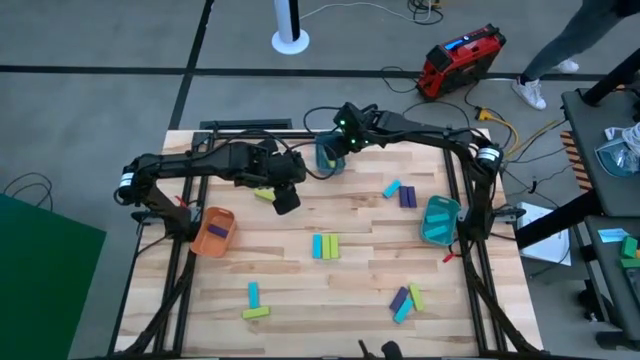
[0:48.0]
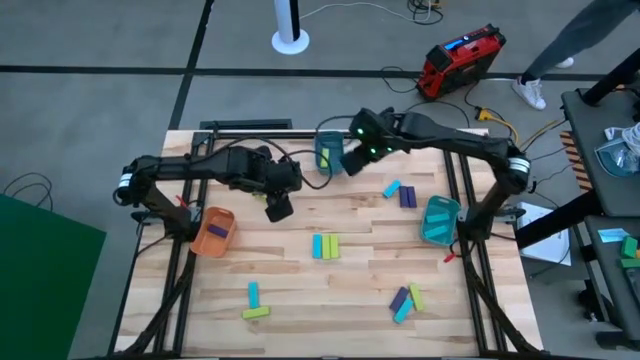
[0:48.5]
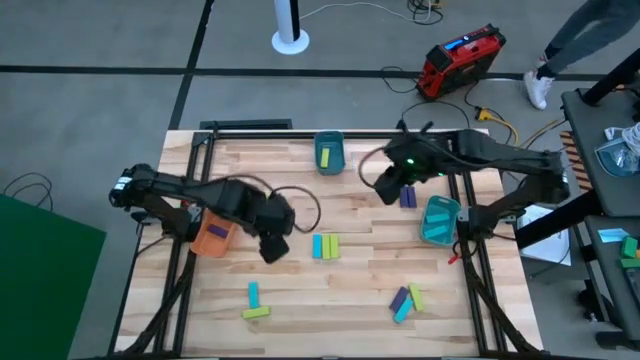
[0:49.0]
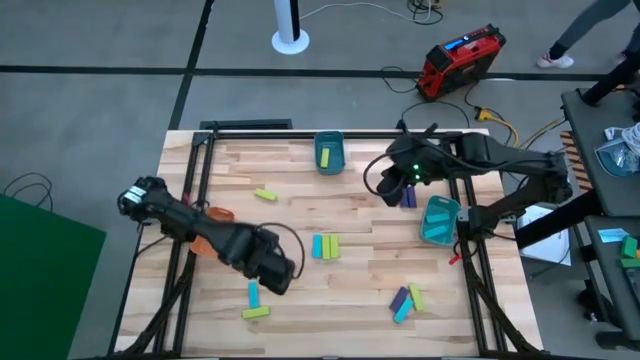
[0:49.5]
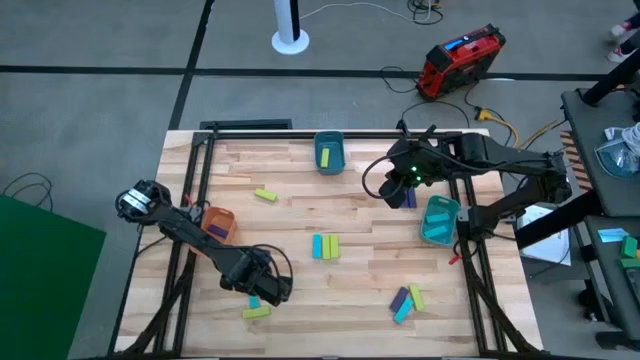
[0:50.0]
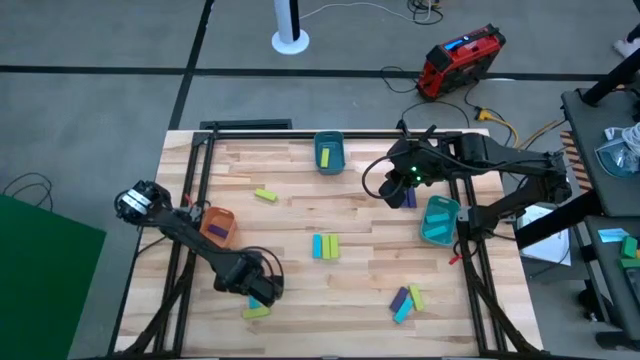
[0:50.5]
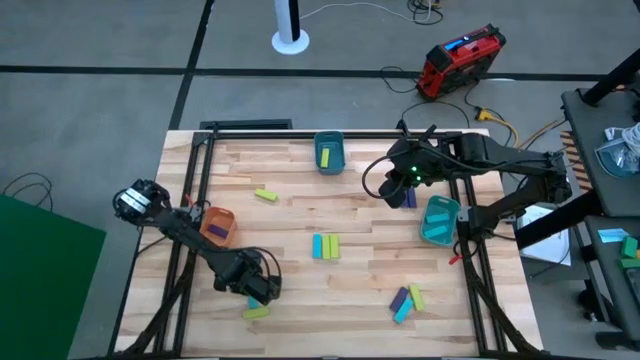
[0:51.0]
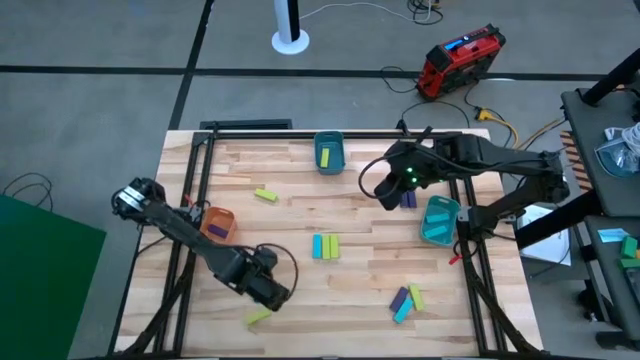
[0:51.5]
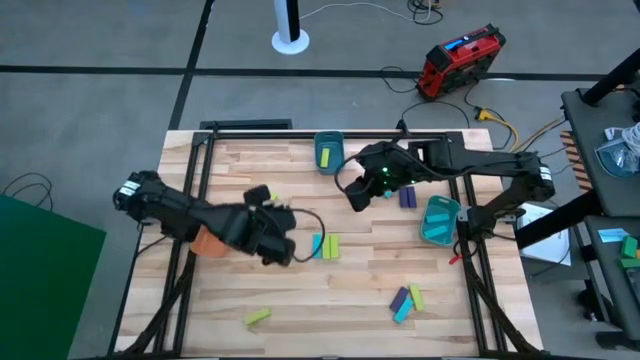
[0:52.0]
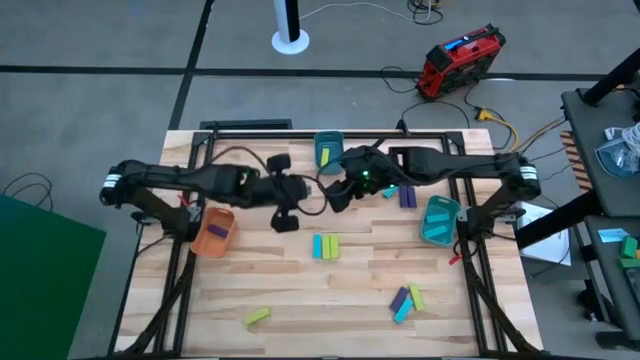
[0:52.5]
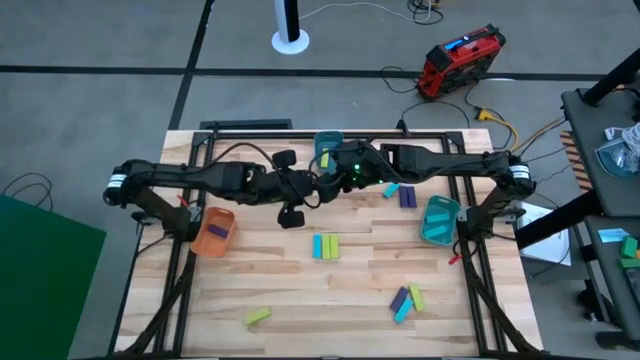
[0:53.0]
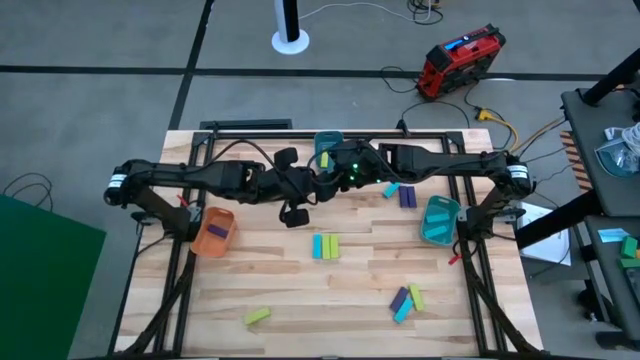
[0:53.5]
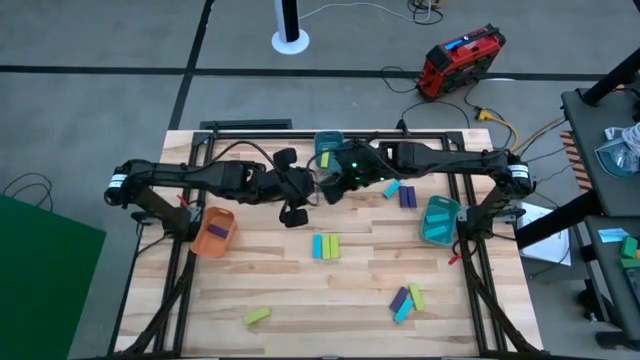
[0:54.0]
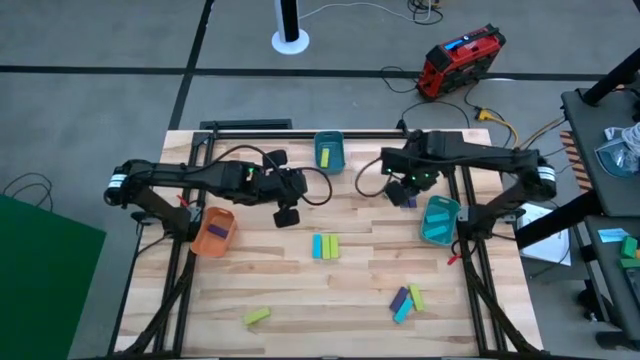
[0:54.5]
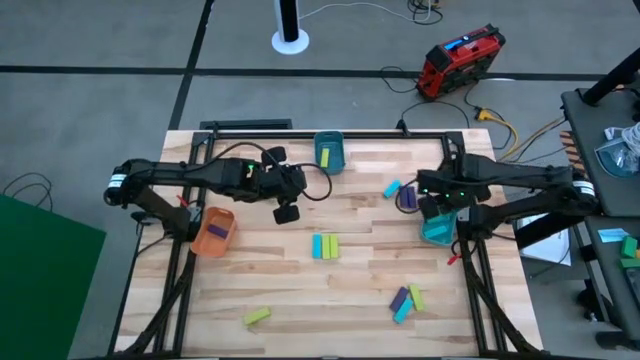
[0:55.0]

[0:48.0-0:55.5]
Task: Sort blocks
Put the blue block into the light blue bin

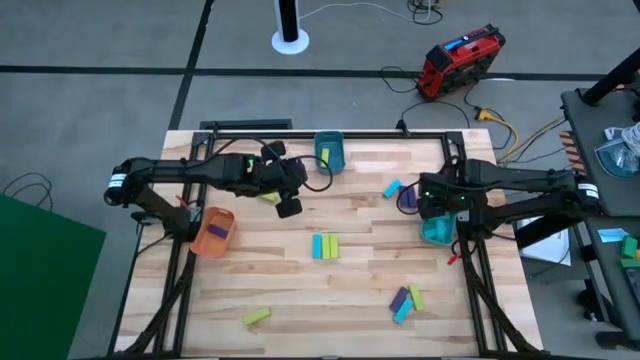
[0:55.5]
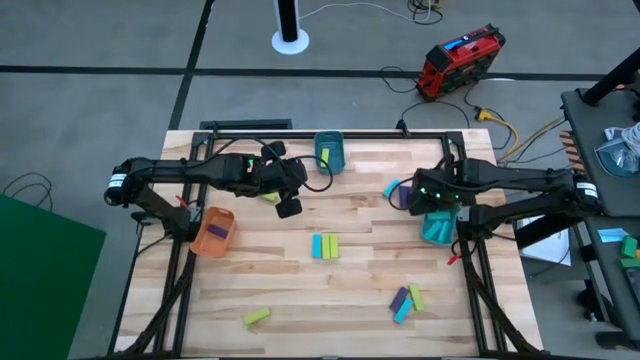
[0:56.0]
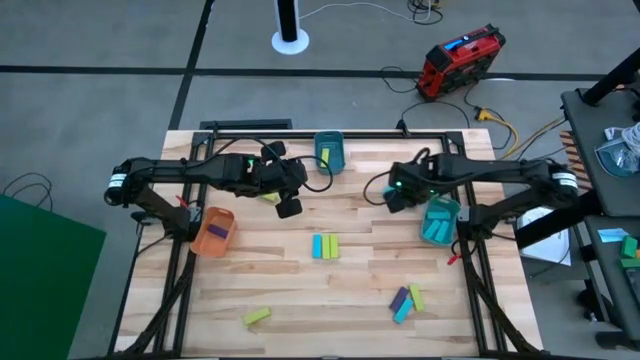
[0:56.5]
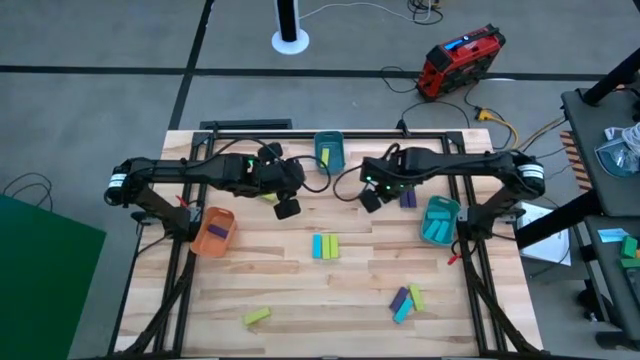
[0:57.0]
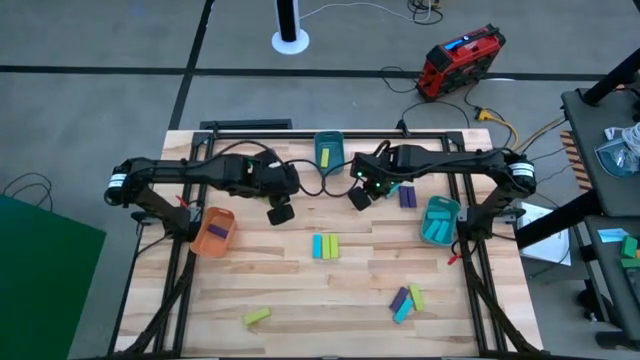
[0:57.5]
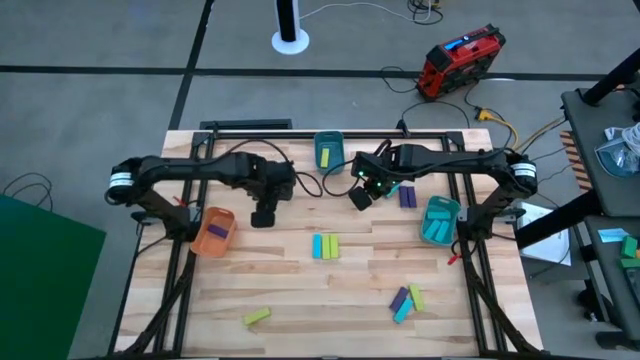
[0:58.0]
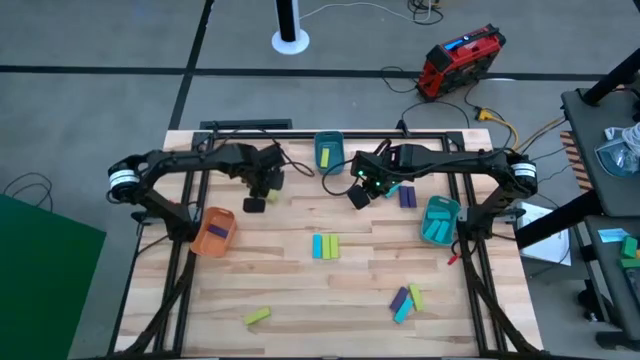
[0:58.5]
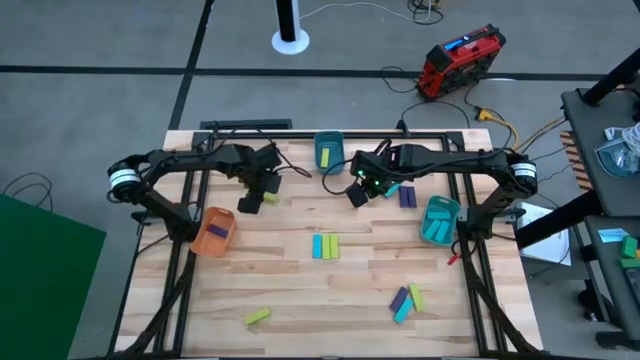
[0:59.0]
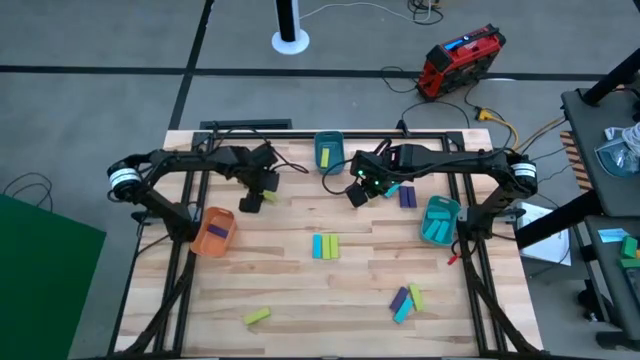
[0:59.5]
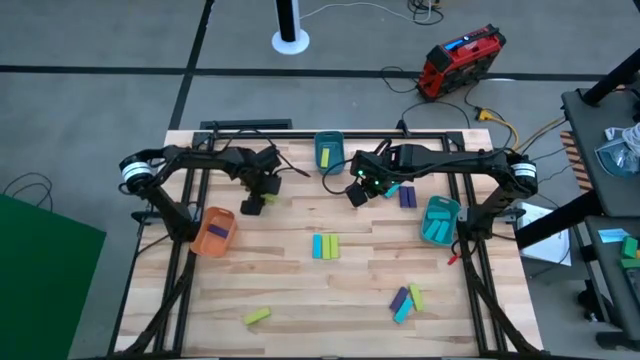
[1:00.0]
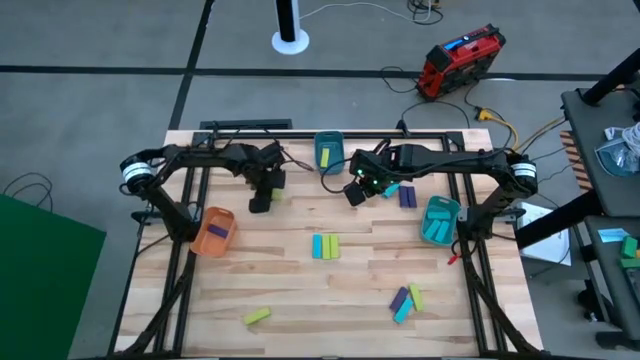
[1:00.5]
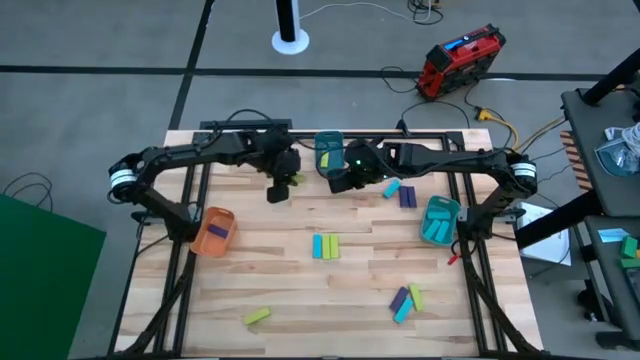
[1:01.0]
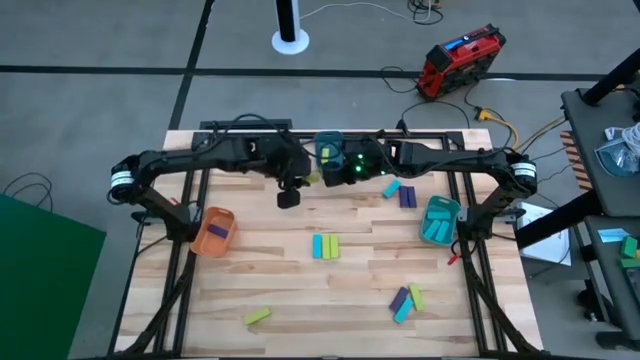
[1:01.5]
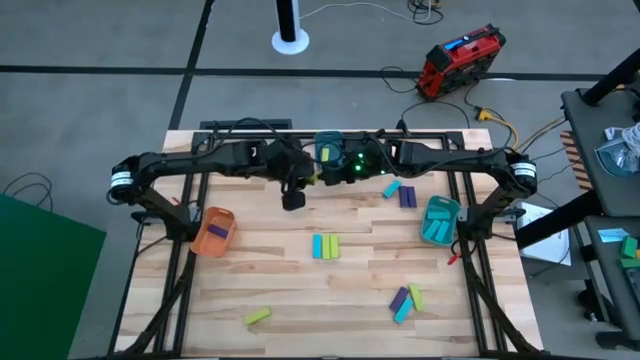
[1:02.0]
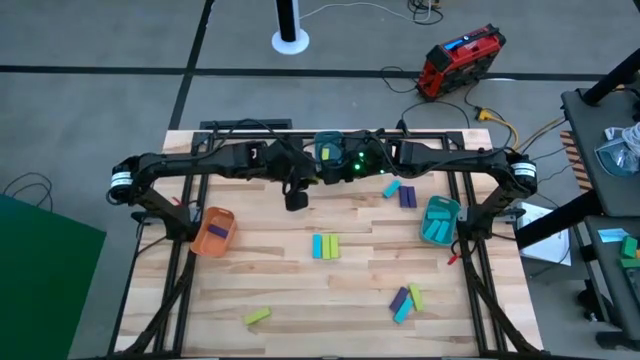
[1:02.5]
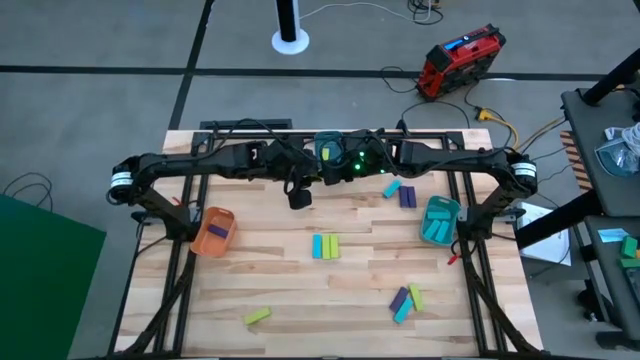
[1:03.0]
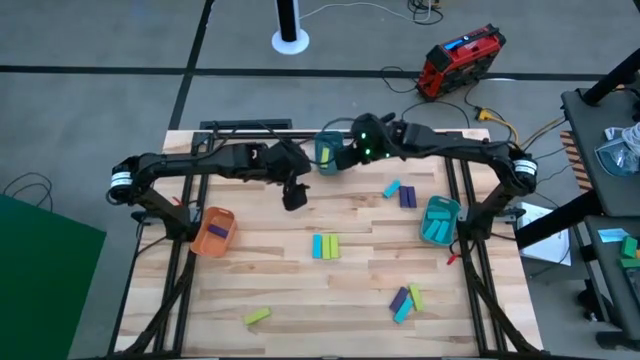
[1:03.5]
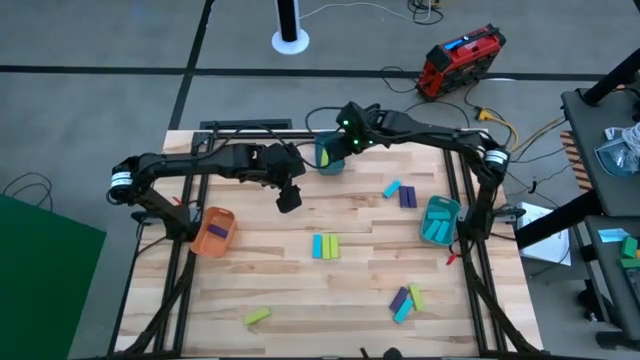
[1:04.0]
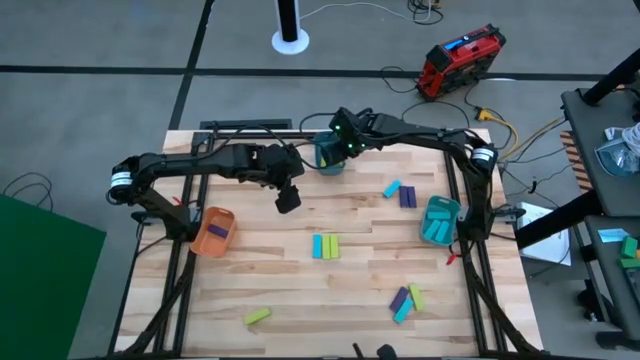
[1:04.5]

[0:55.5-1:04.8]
Put the green block into the blue bin

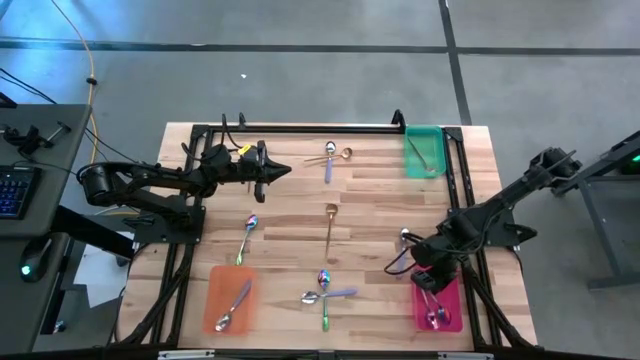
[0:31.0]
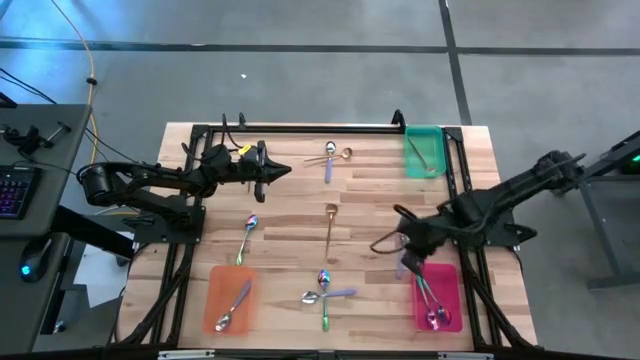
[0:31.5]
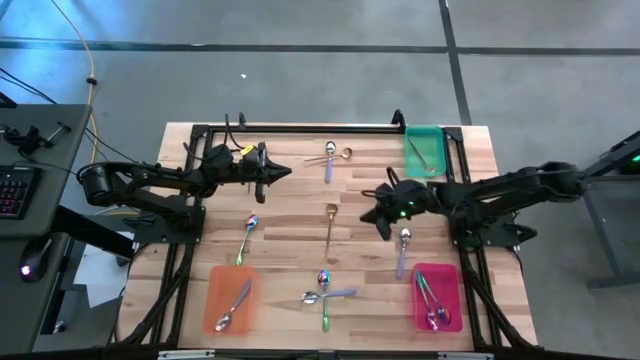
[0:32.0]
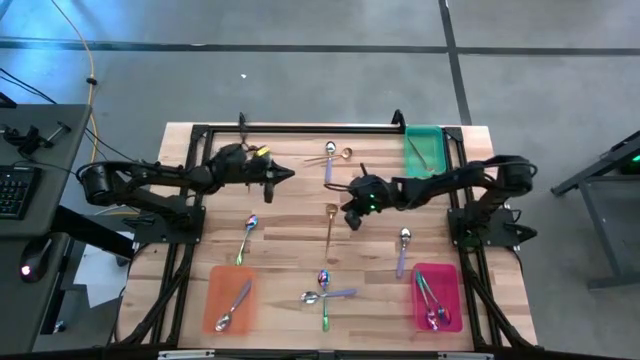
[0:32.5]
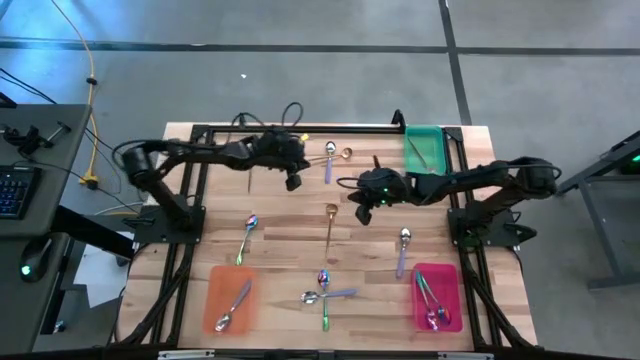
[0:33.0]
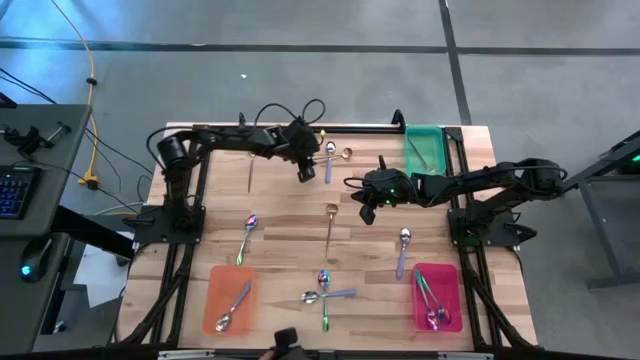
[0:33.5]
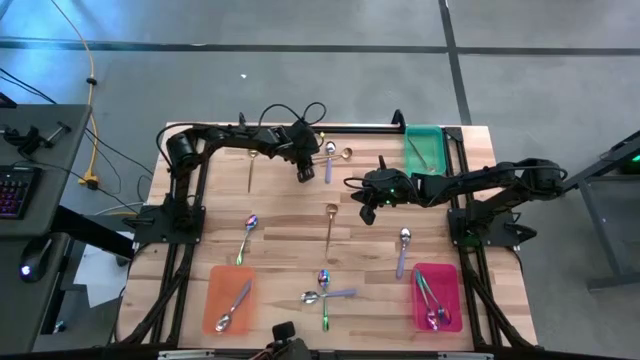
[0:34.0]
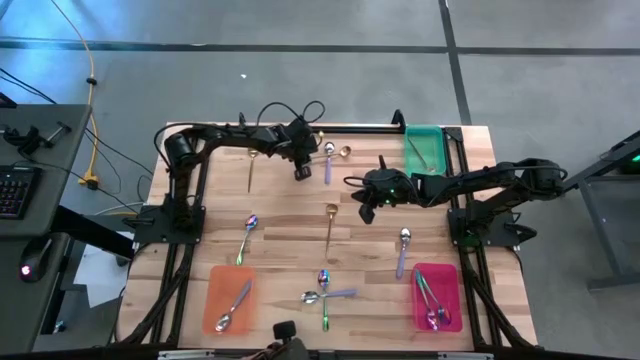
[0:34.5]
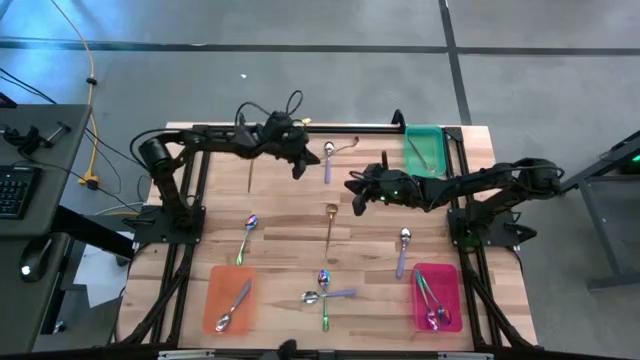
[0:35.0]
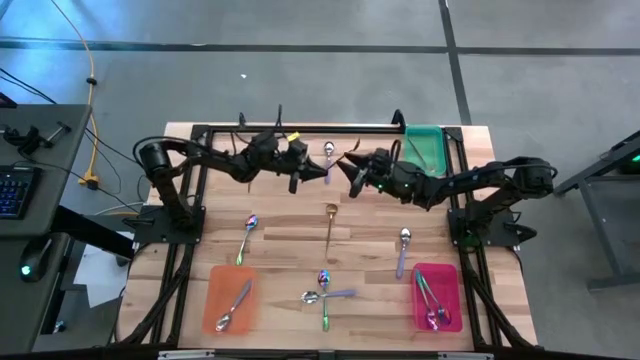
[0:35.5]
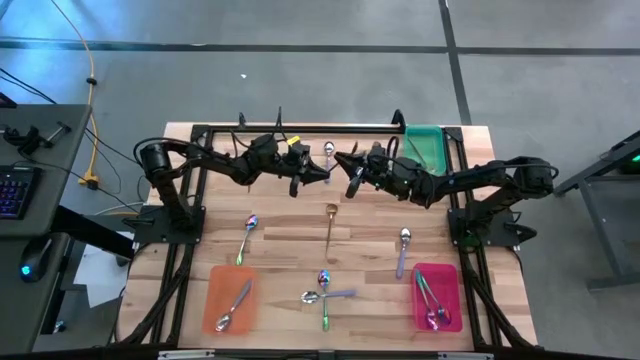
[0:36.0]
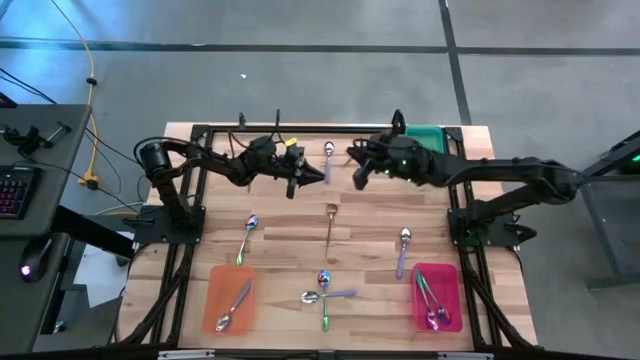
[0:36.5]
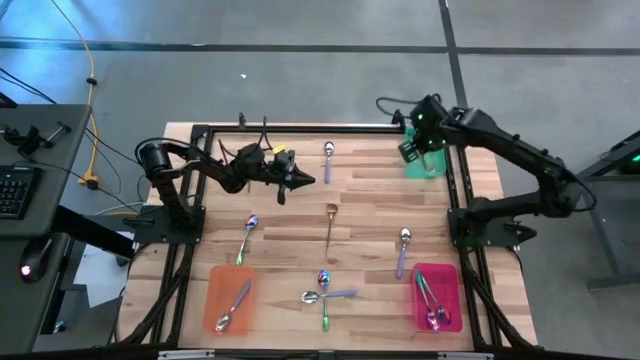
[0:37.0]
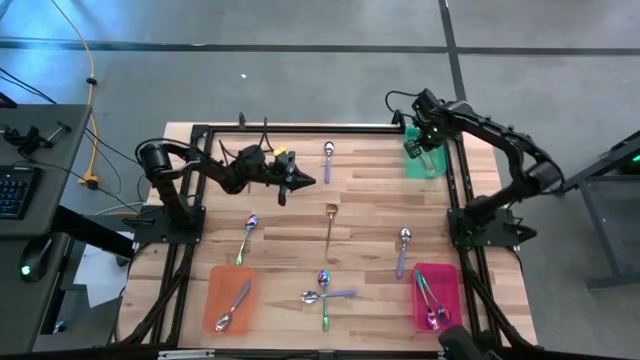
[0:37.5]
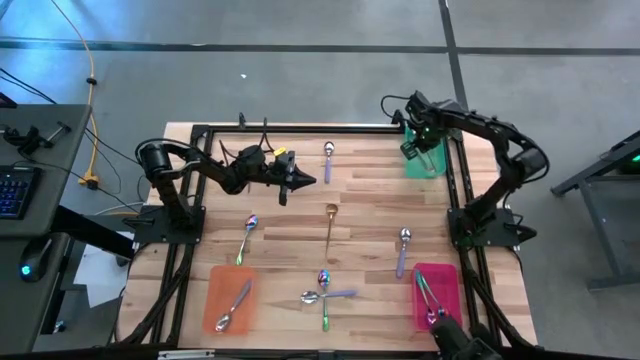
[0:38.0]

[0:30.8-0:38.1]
Task: Sort silverware by color (type)
Put the golden spoon into the green bin
